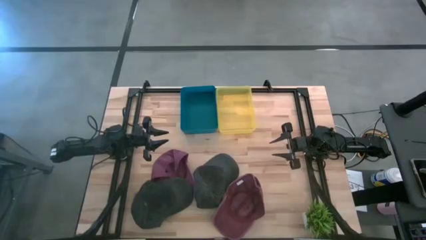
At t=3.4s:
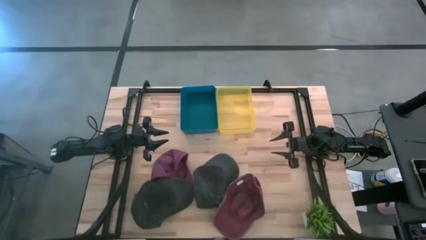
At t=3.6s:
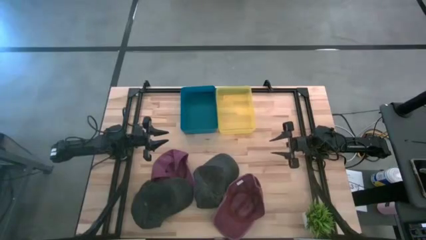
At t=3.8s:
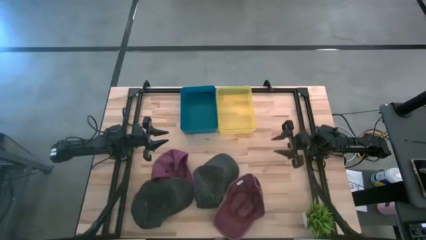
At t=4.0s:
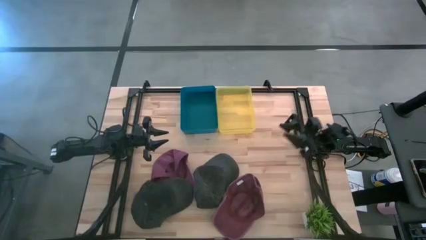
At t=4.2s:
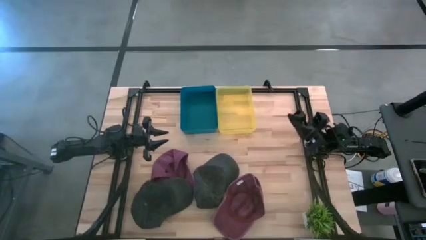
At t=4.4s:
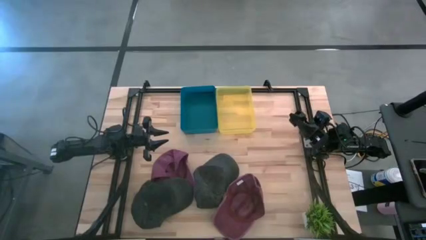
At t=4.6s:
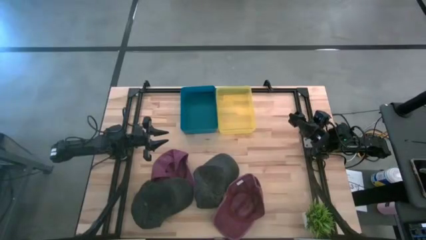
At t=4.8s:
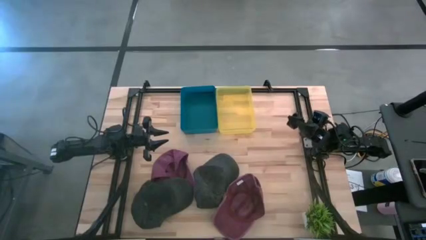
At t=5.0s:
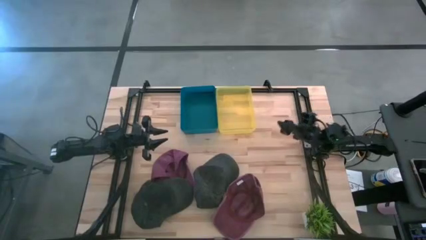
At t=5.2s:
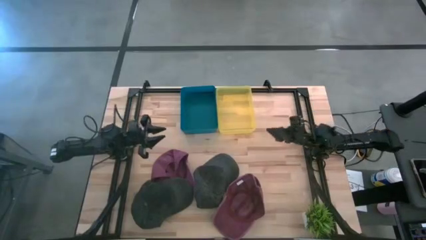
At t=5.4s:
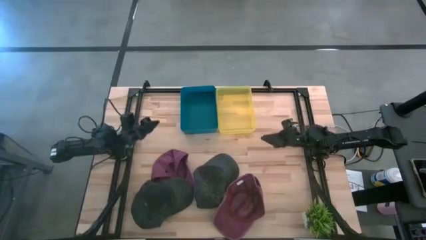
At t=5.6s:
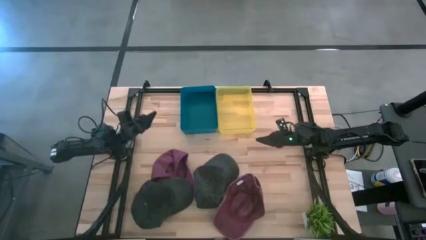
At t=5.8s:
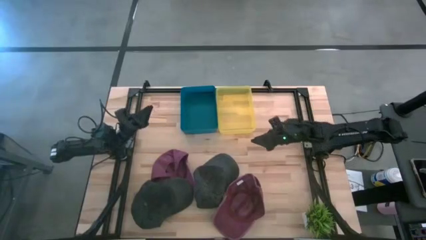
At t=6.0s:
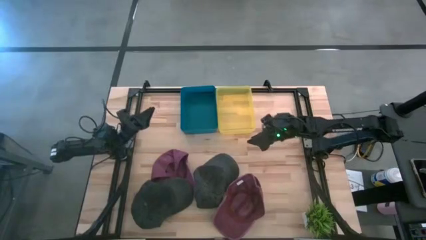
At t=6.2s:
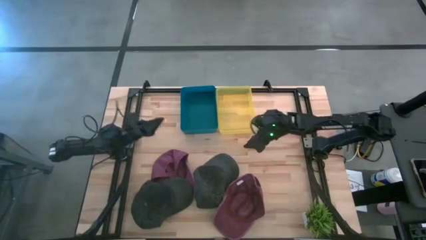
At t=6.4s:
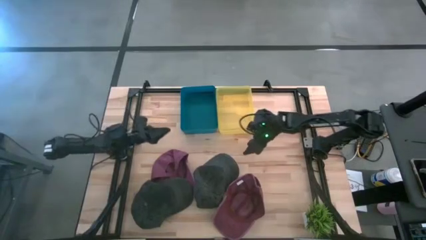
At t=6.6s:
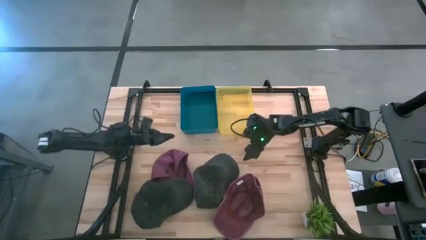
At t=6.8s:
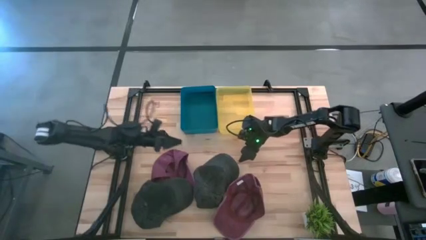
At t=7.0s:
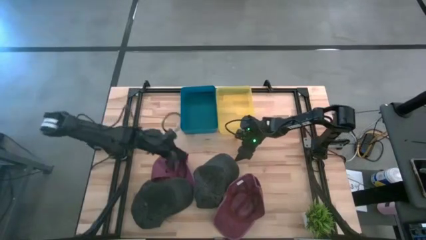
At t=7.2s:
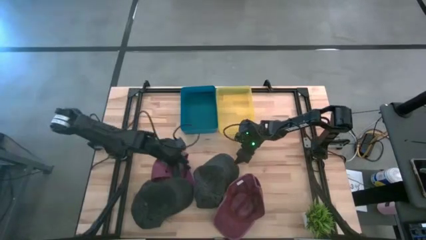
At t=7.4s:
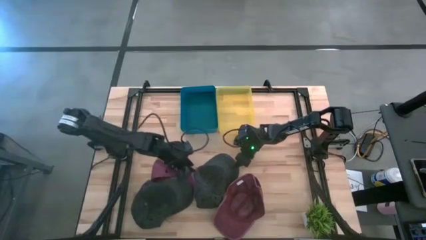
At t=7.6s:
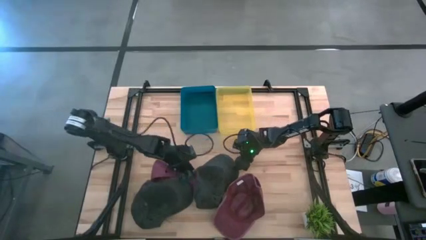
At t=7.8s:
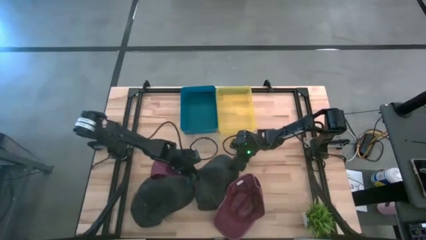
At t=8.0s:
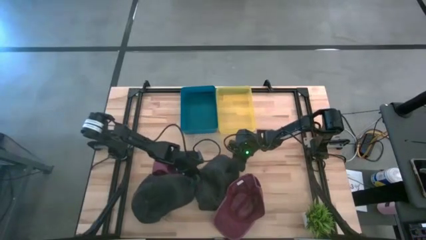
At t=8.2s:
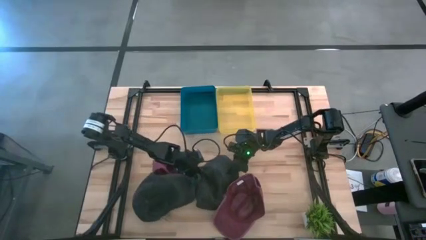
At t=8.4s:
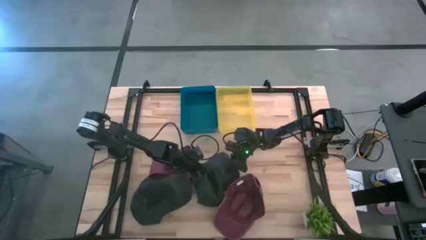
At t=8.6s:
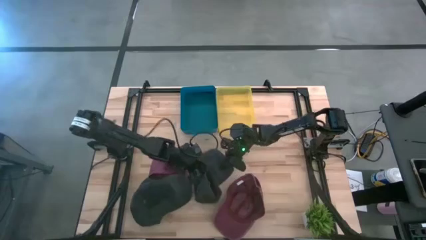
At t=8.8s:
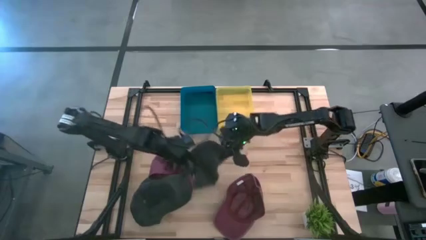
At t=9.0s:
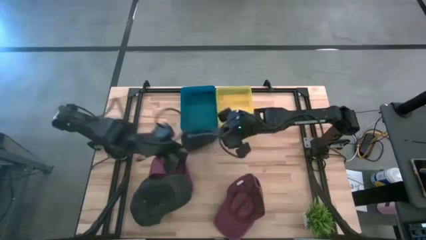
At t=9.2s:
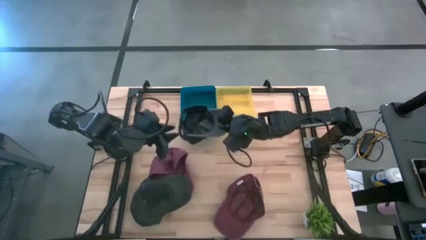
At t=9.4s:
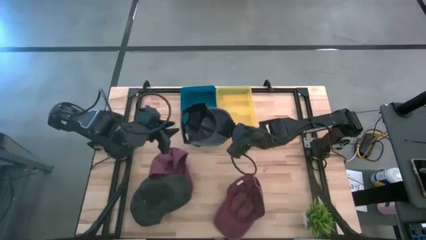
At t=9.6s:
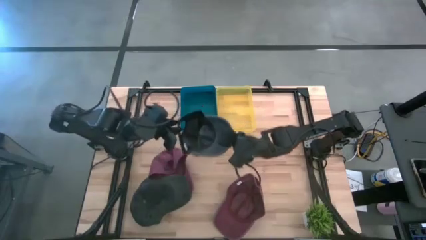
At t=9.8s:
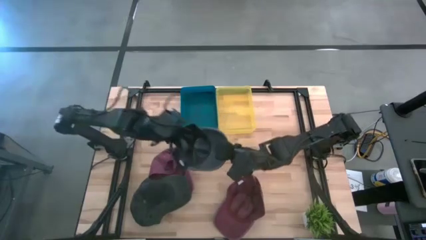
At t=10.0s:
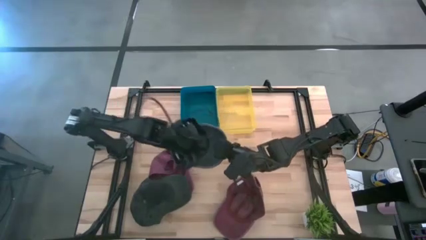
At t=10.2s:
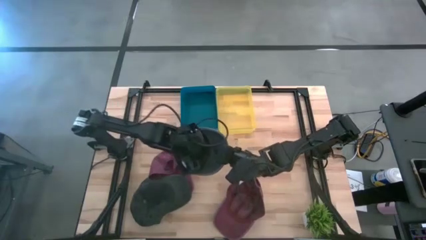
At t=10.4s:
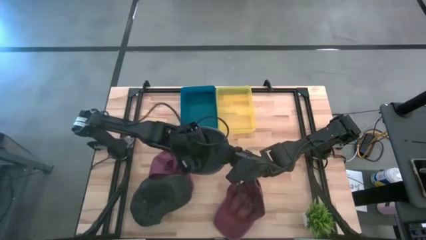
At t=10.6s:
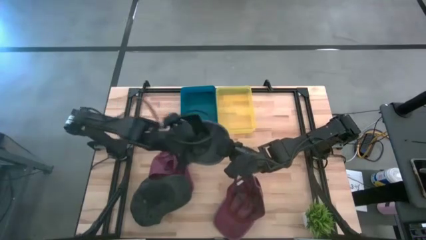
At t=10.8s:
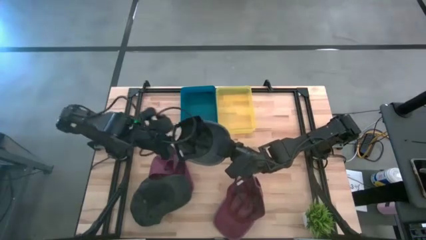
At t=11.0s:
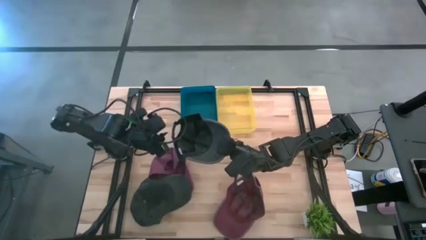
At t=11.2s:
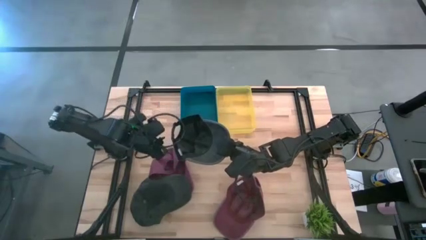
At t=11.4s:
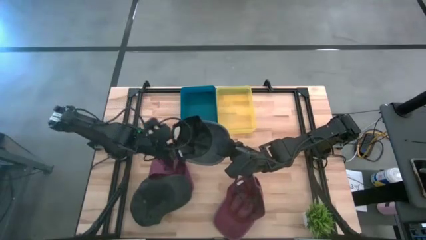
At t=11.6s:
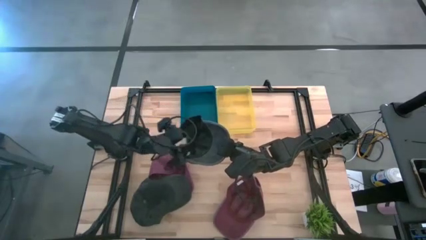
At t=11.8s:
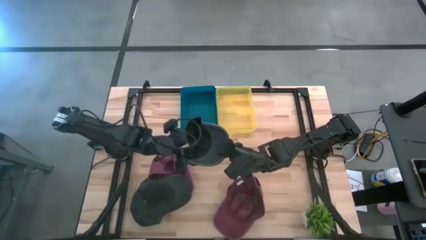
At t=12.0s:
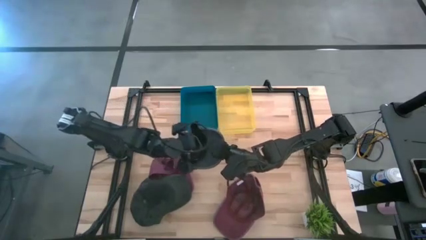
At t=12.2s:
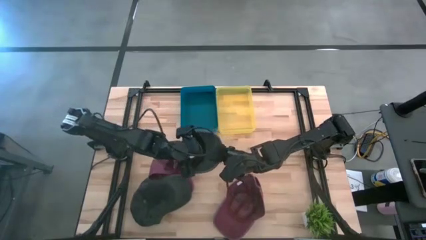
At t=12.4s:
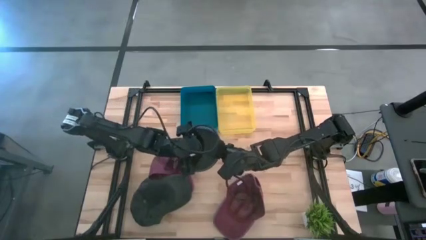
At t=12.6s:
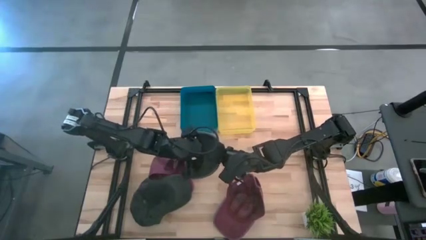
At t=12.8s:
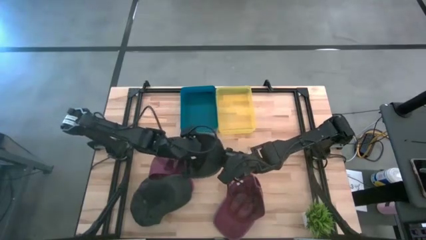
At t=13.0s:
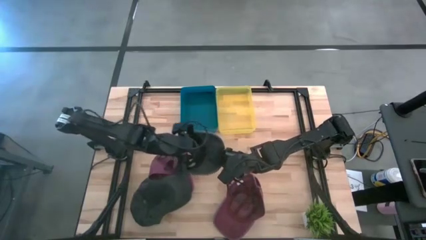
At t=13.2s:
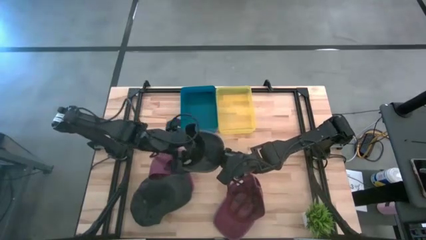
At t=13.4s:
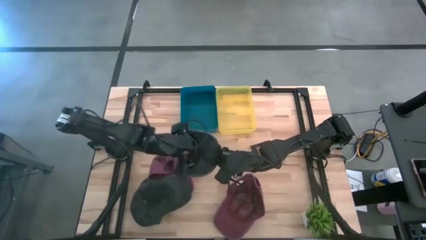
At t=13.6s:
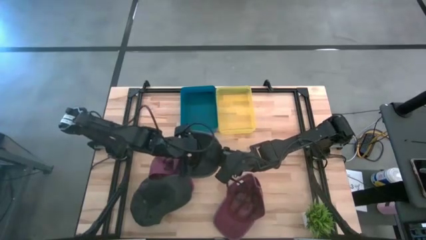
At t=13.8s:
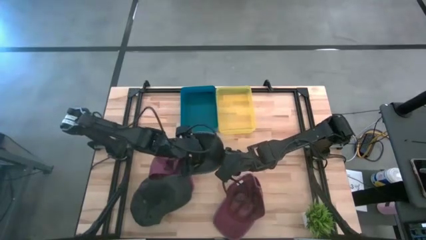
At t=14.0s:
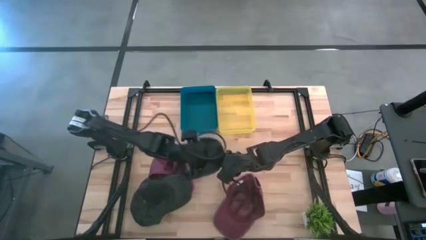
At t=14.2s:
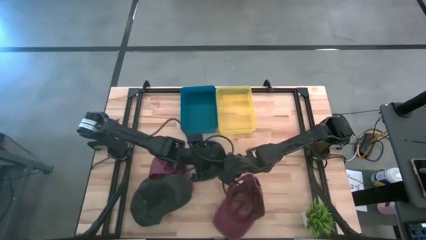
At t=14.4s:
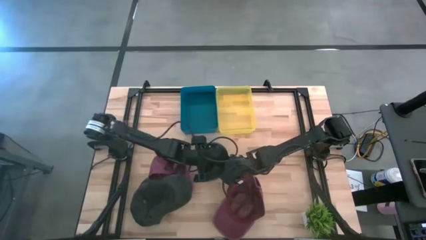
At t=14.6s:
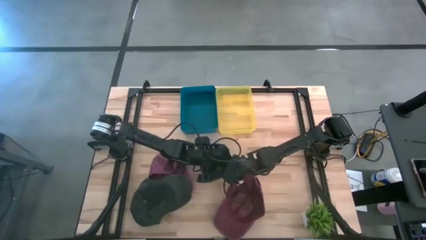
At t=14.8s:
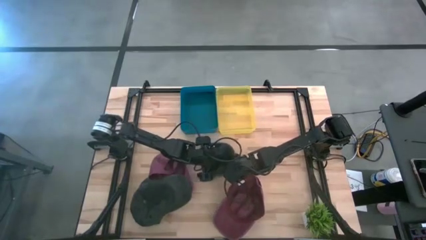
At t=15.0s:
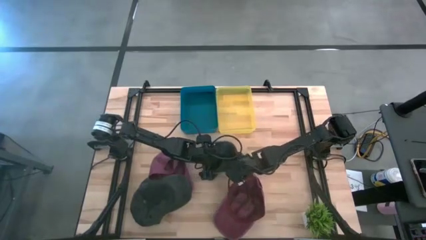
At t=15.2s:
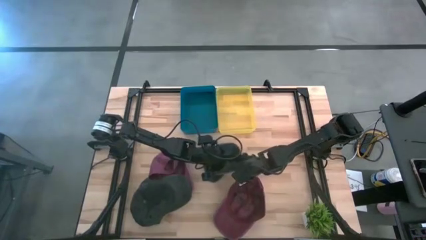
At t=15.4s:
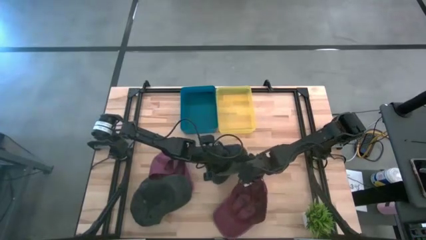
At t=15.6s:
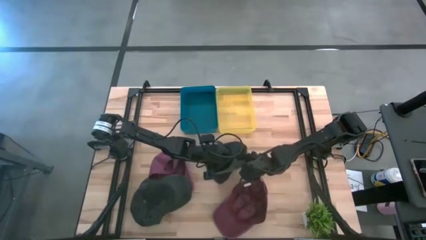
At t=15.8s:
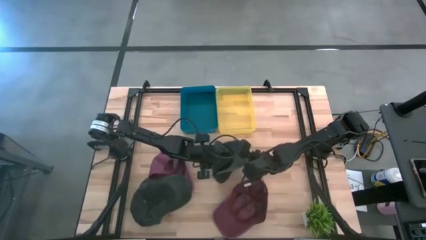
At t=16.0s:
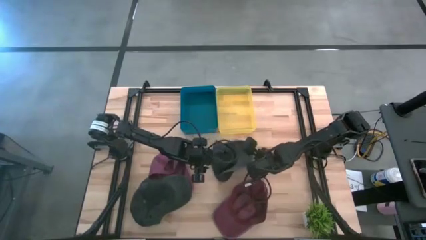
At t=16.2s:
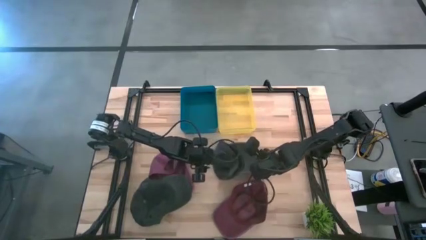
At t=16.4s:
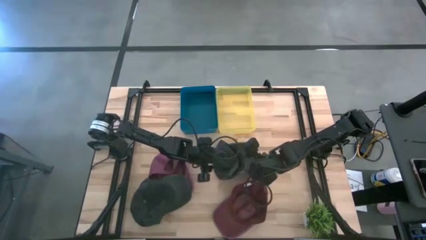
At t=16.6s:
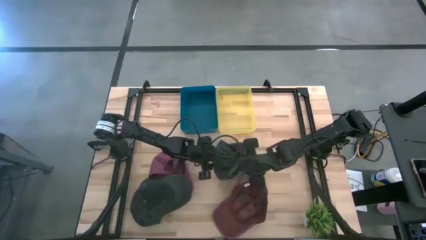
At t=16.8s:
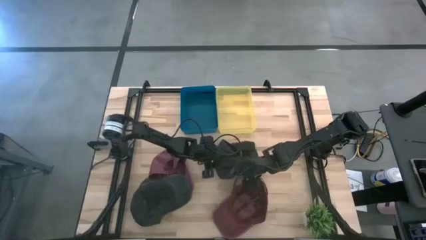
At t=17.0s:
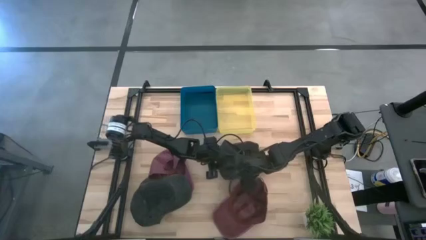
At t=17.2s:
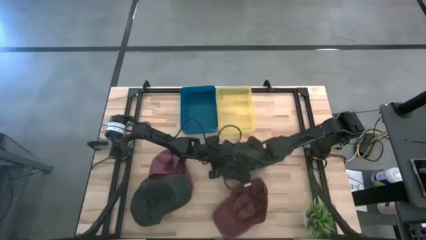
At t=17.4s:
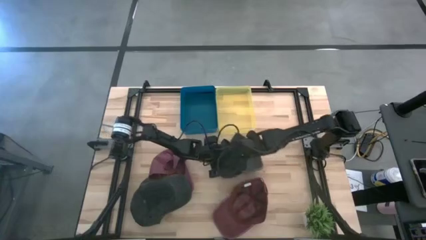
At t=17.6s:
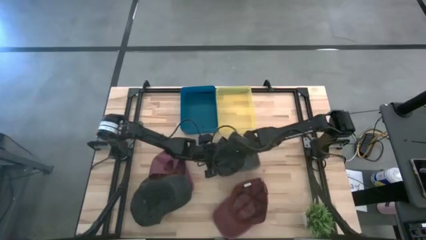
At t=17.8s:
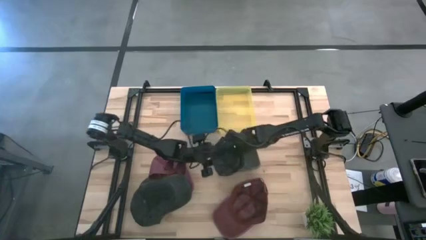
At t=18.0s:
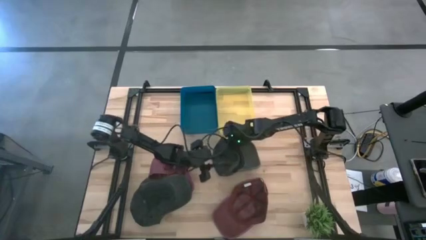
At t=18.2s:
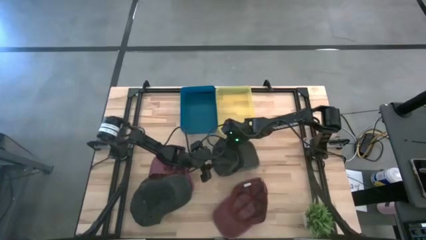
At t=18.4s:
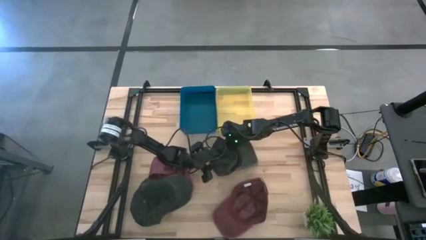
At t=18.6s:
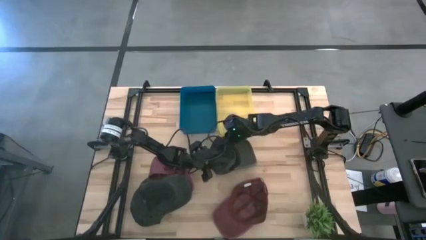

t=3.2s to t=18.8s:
Task: Pick & Place hat
Put the black cap into the yellow bin
